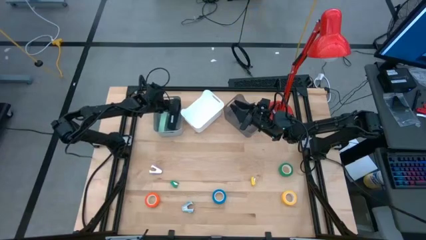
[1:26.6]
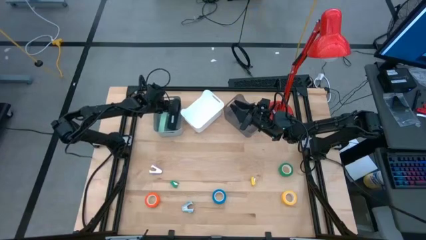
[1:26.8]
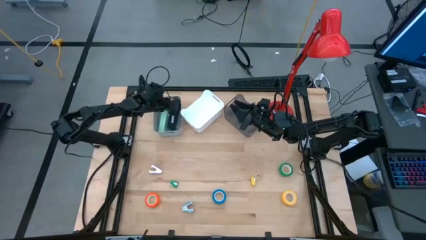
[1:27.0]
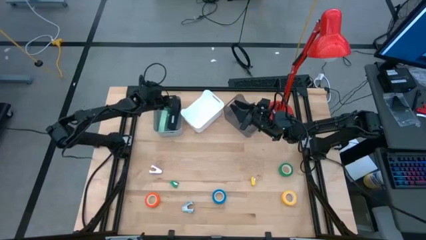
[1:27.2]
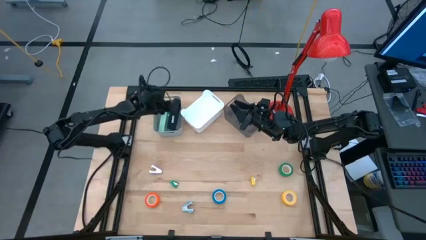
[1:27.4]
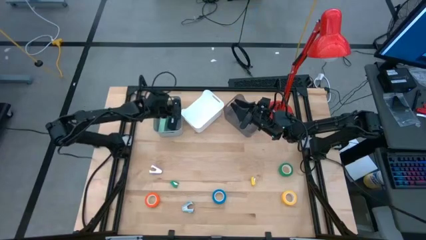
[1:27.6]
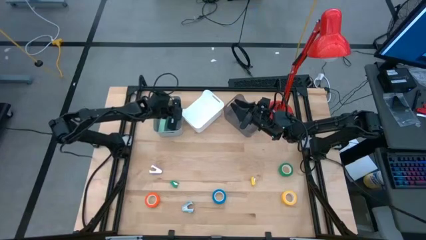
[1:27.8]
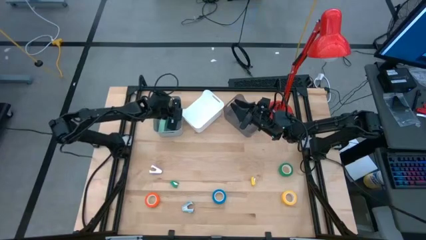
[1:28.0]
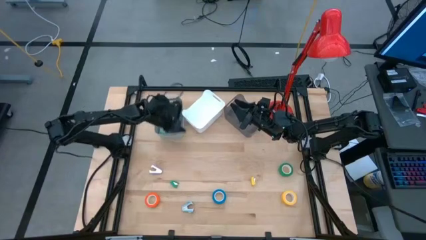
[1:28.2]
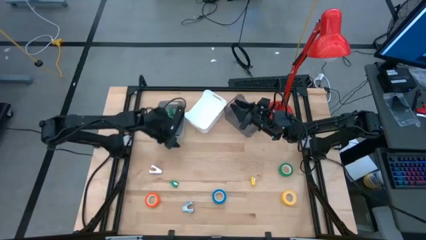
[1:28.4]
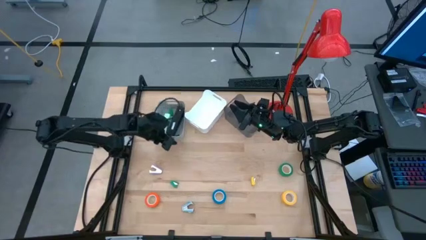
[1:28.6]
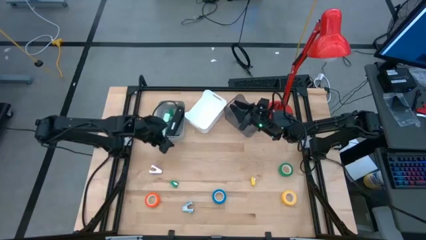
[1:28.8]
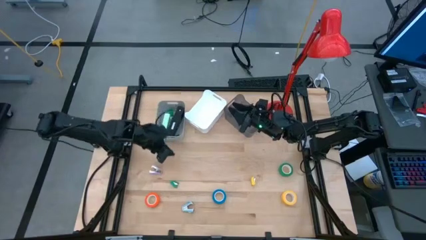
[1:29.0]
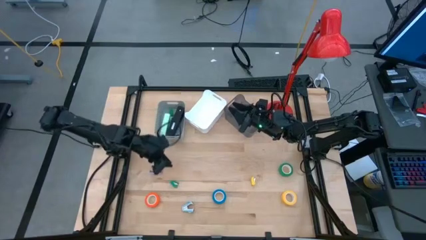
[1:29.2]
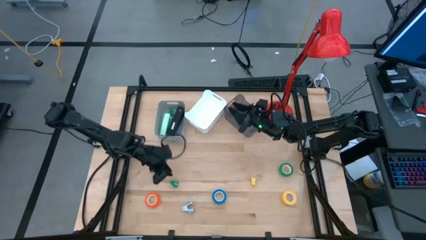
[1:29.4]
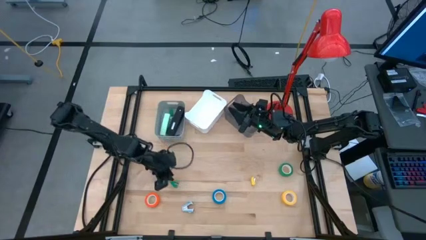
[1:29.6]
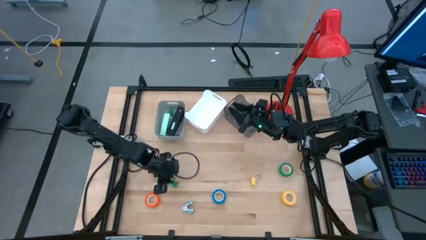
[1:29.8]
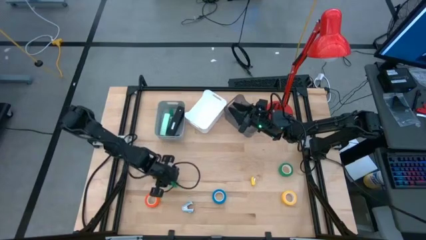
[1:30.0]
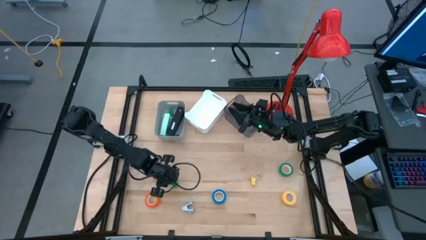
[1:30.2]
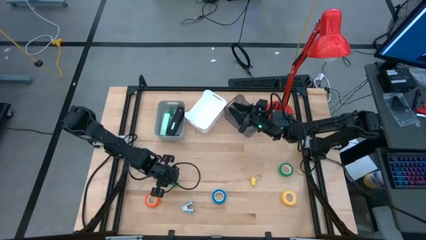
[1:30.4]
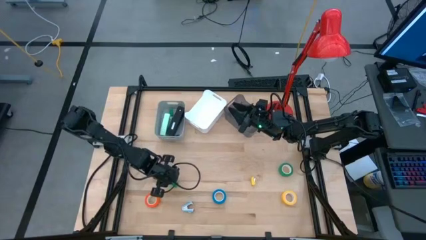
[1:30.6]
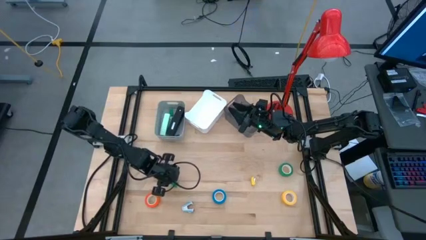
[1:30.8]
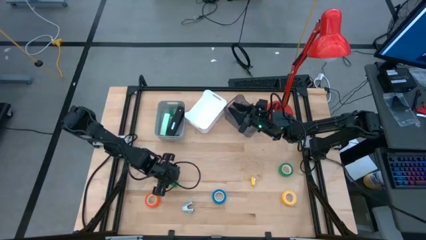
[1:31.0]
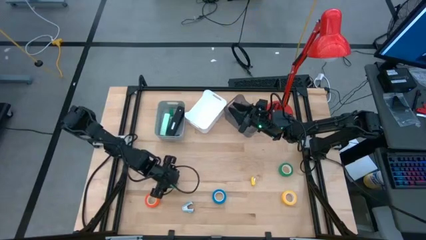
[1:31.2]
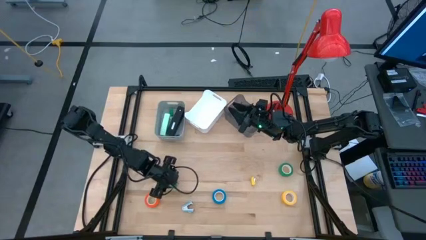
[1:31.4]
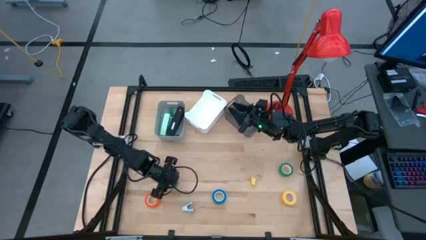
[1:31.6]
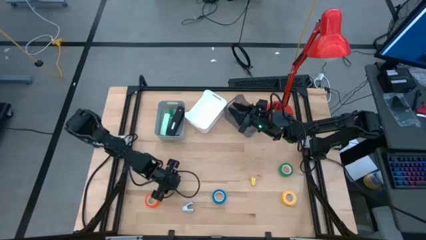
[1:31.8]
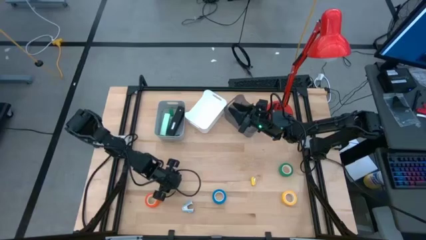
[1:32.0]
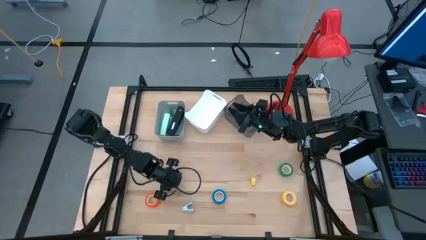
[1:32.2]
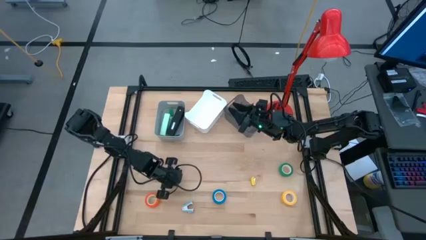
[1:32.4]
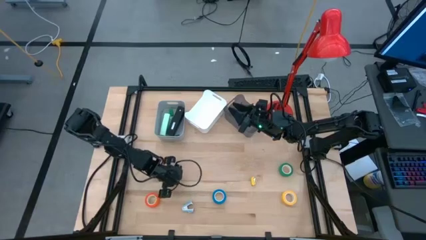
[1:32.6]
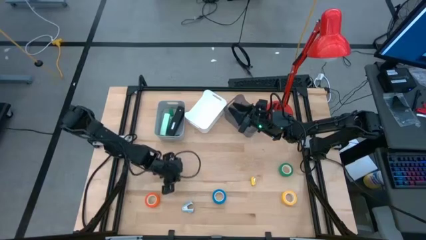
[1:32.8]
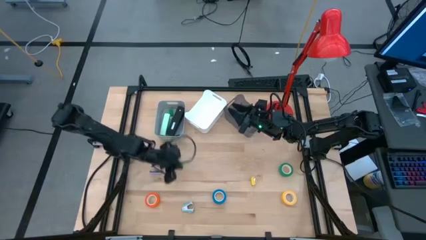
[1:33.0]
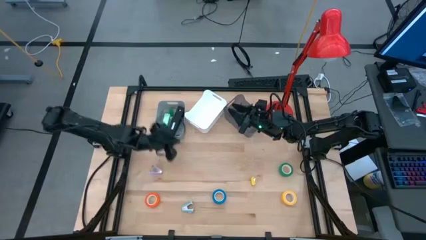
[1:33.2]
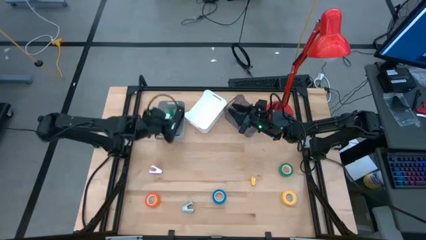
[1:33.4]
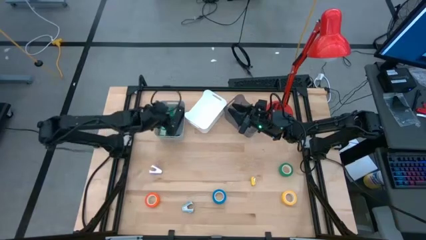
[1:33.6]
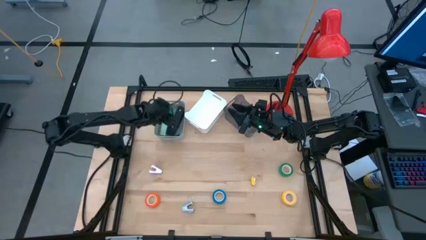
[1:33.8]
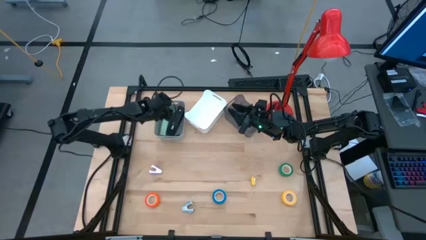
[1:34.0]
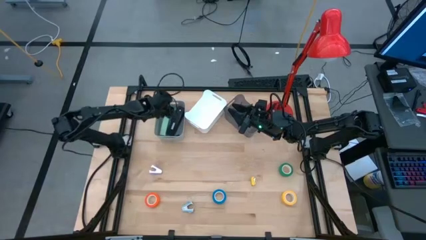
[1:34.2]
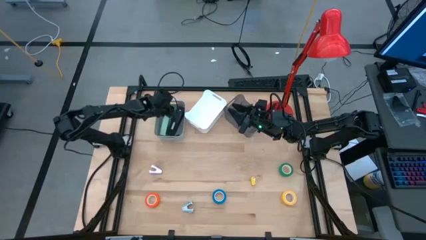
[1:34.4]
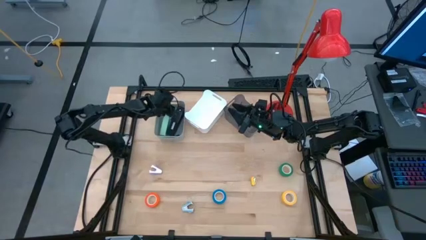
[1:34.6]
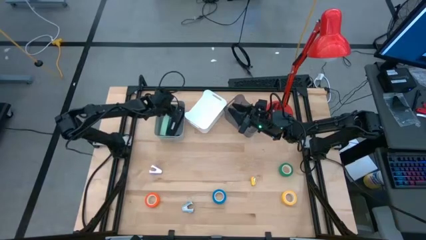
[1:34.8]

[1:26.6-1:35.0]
Task: Pick and place Stapler, Stapler remover, tape
Put the small green stapler into the gray bin

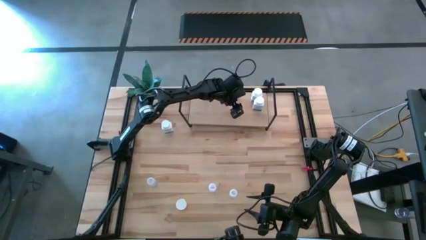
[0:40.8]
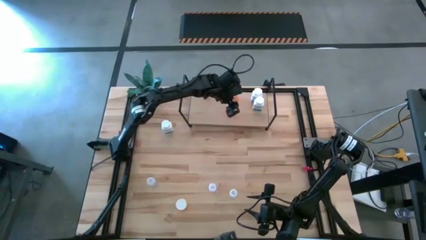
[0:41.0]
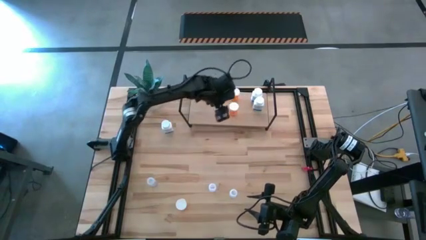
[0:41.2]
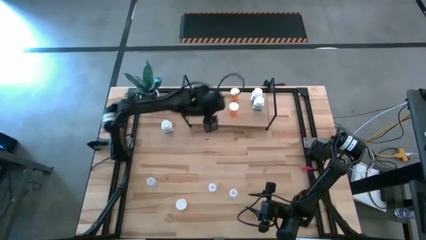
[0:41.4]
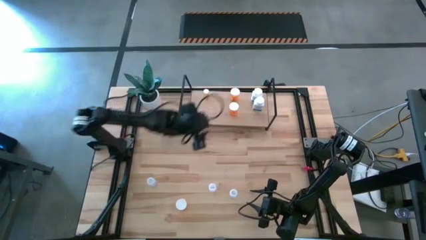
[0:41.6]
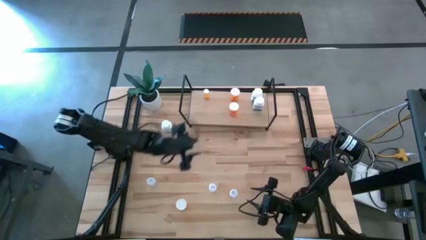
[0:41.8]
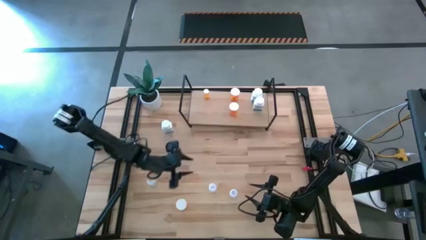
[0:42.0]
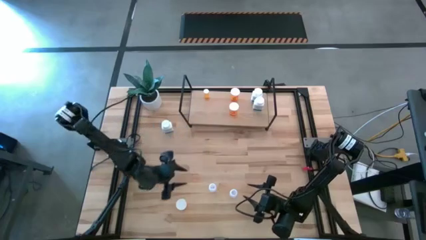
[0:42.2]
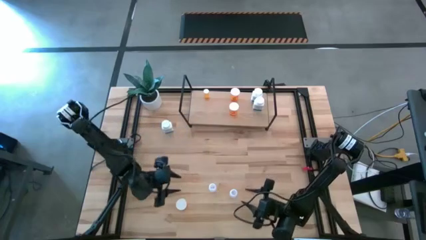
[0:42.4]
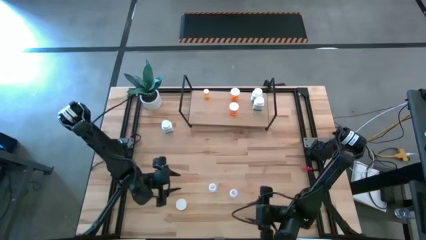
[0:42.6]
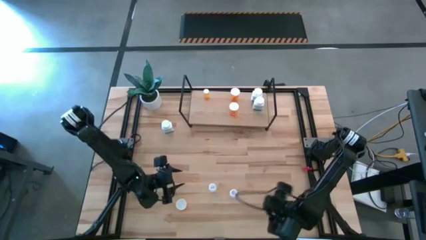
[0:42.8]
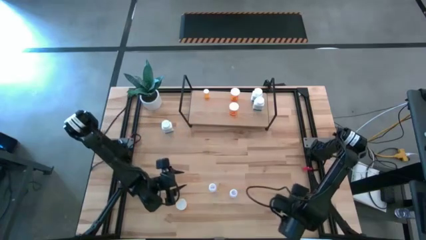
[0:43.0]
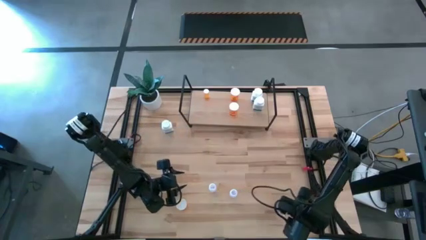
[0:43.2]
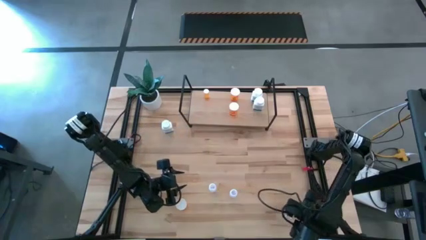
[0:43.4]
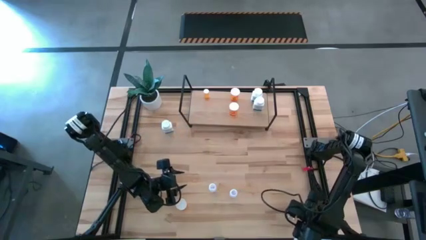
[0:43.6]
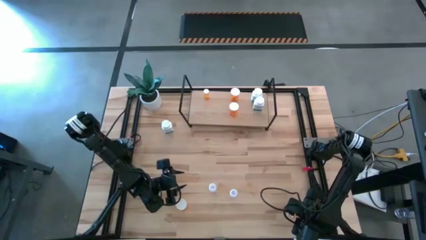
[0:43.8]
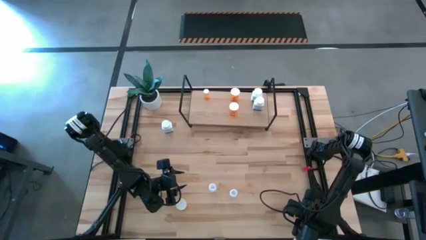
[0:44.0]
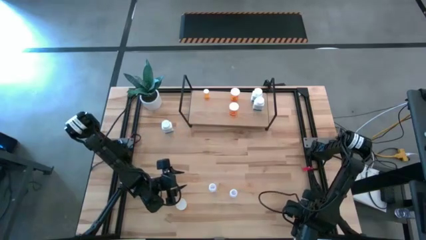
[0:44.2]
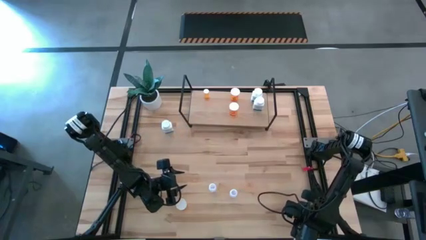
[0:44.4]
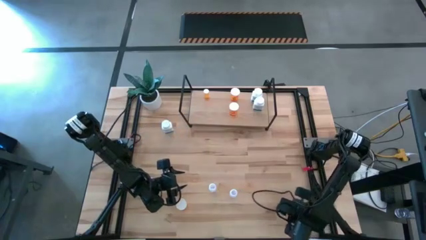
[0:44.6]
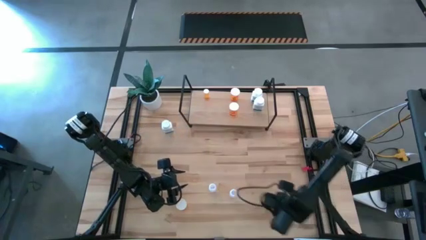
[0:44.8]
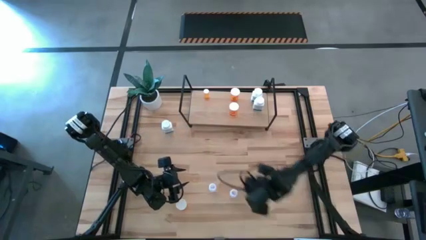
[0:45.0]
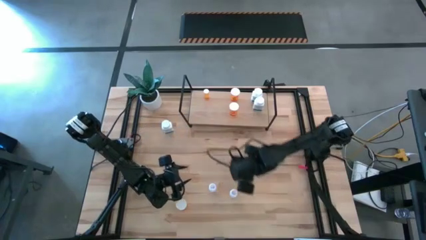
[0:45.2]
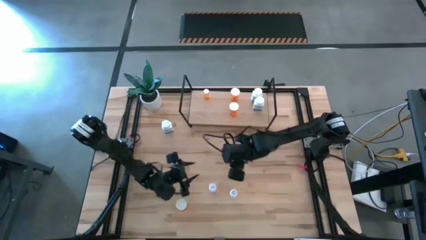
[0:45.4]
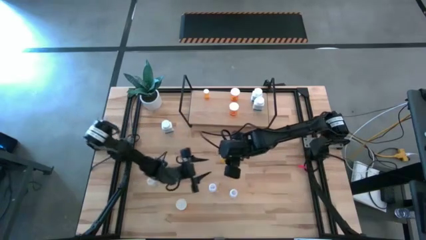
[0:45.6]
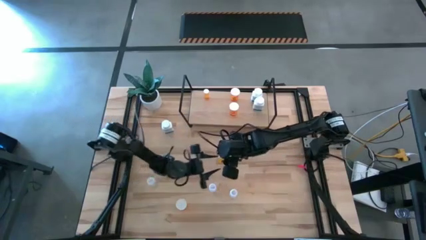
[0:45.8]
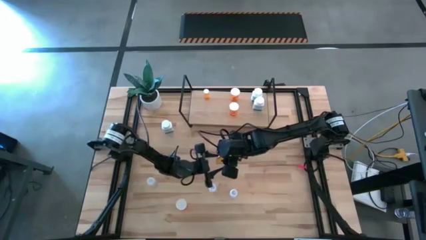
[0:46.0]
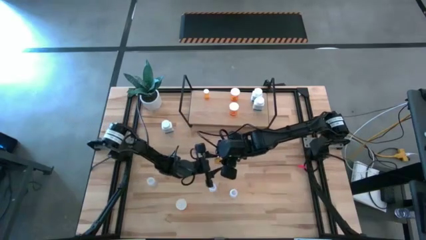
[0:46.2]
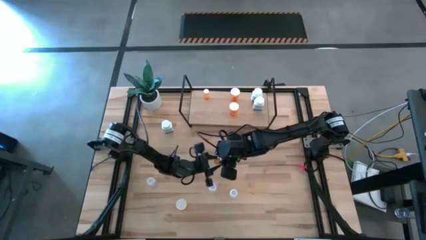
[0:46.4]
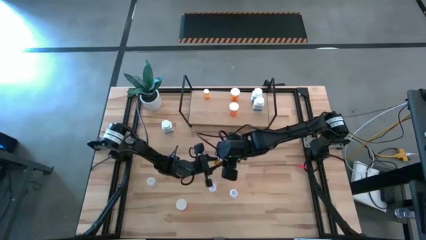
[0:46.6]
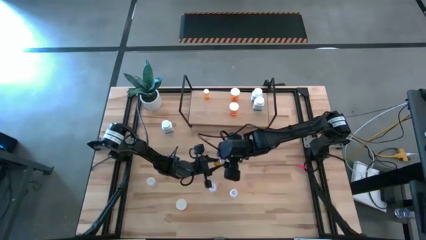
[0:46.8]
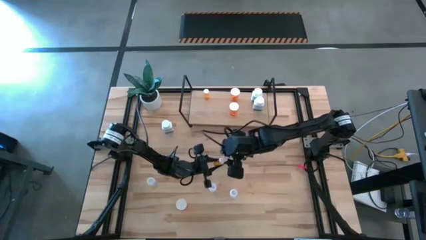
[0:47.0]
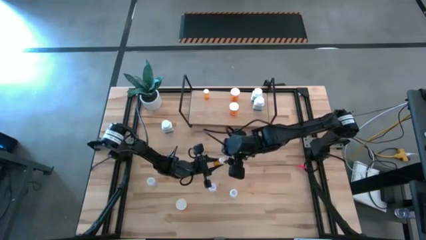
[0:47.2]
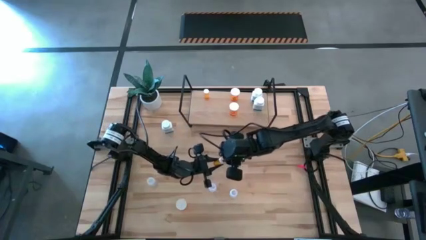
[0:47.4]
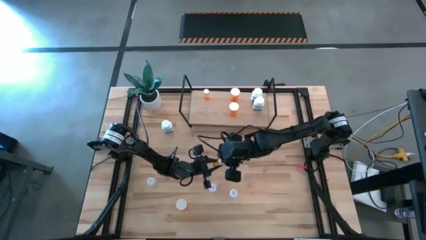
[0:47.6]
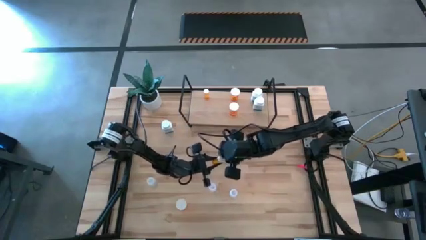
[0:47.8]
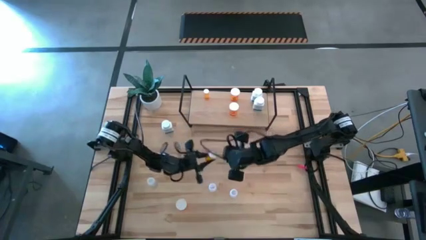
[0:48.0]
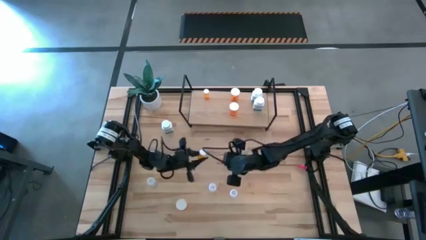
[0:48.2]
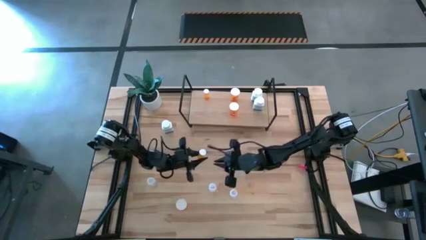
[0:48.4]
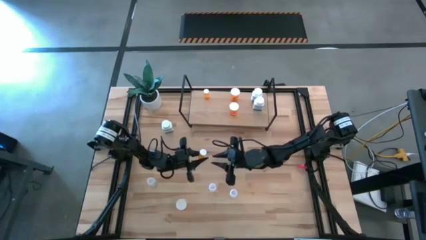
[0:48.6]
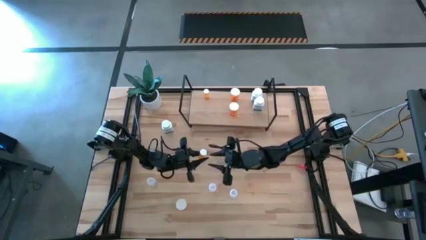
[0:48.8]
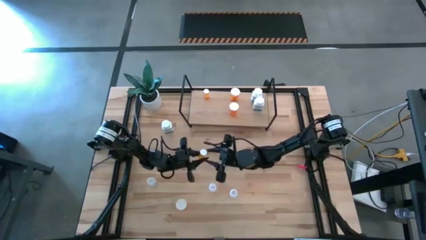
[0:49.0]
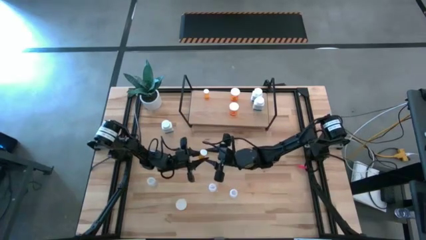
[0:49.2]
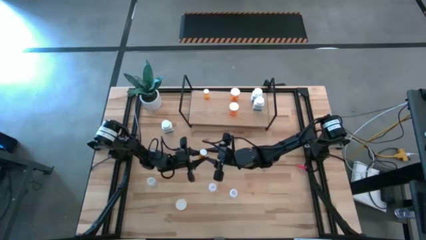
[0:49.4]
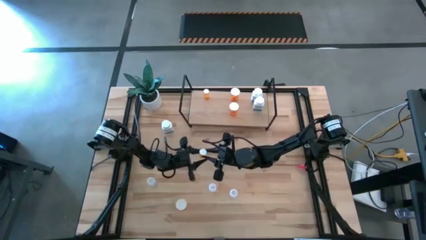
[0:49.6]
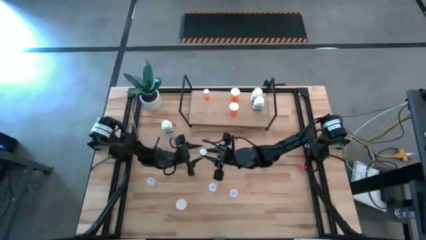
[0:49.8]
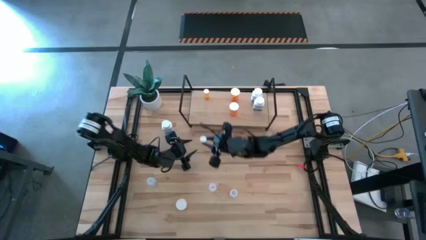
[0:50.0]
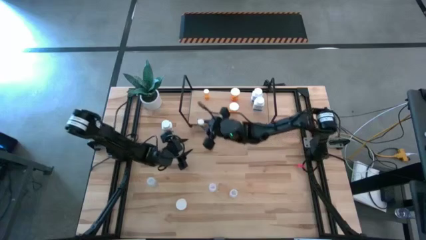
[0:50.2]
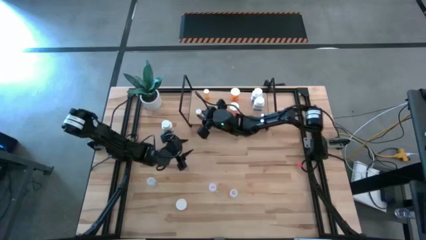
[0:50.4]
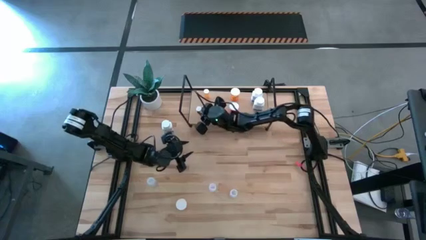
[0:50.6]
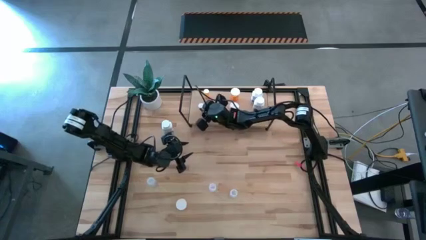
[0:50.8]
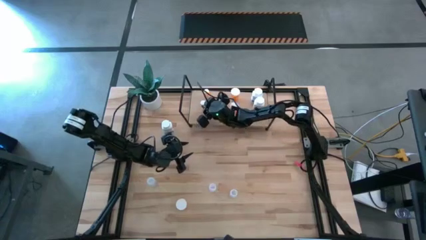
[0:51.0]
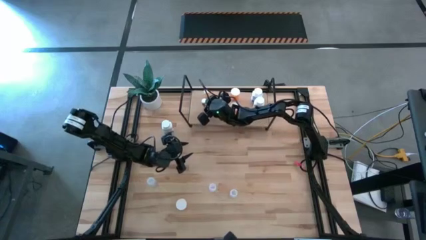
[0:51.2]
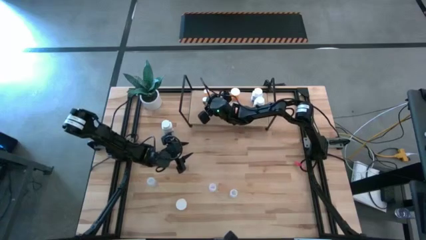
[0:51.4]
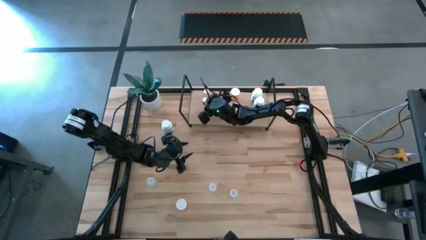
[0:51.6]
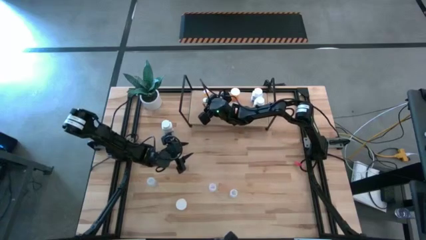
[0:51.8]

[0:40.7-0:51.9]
Task: Pick and place medicine bottles onto shelf by color
Put the small orange medicine bottle on the shelf aligned with the other small orange medicine bottle
